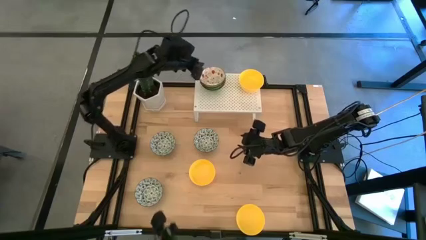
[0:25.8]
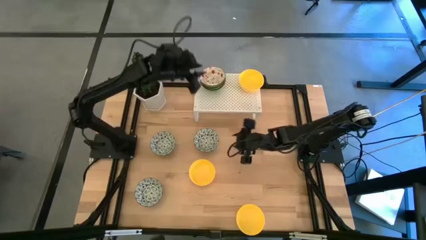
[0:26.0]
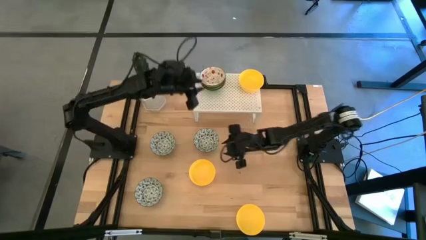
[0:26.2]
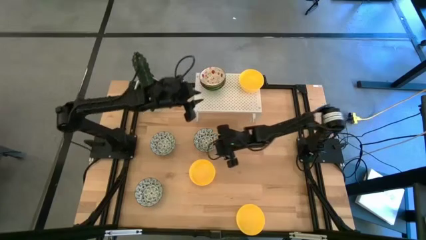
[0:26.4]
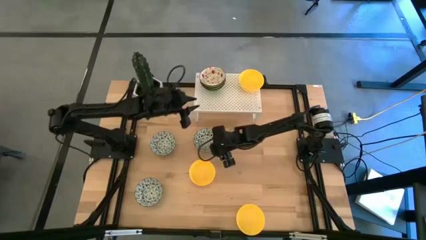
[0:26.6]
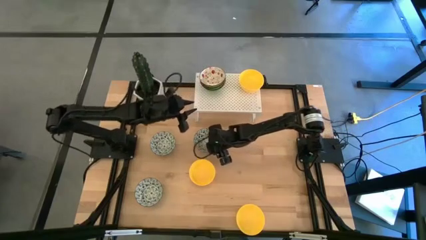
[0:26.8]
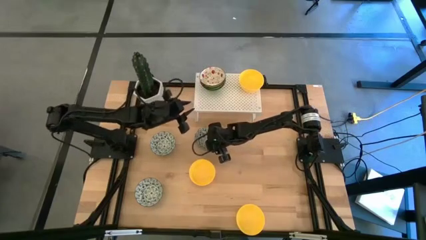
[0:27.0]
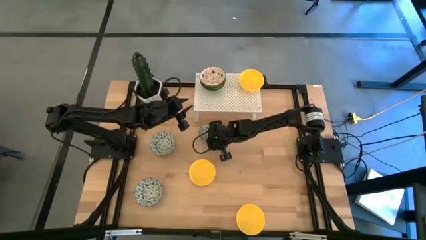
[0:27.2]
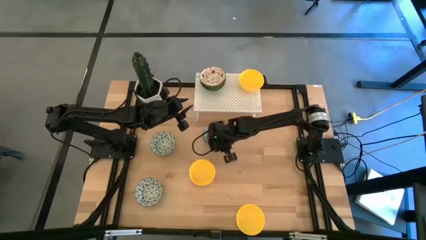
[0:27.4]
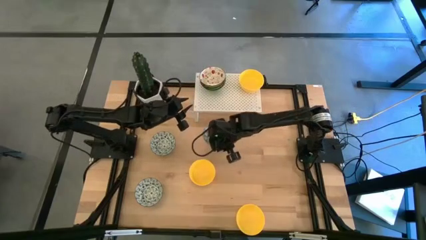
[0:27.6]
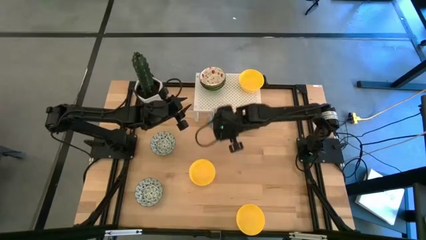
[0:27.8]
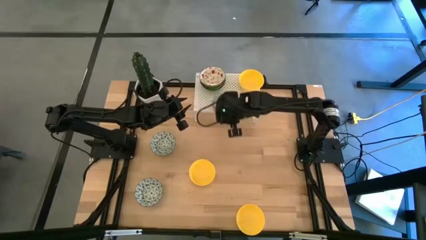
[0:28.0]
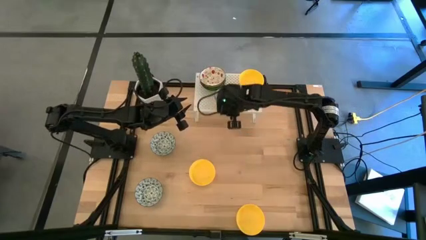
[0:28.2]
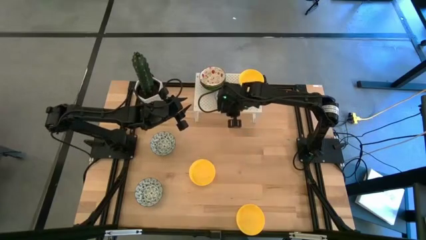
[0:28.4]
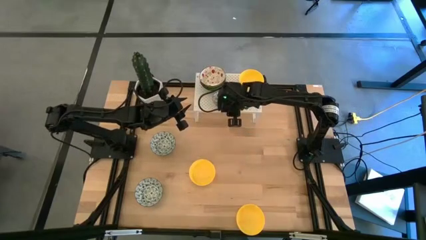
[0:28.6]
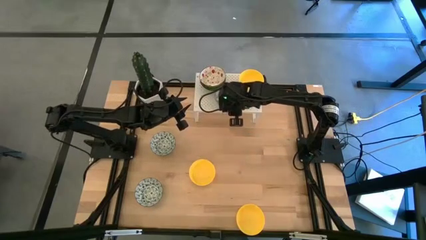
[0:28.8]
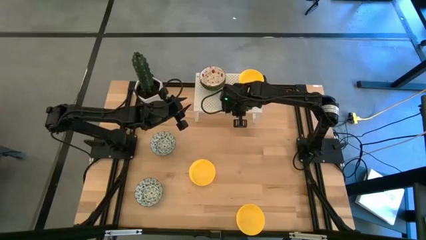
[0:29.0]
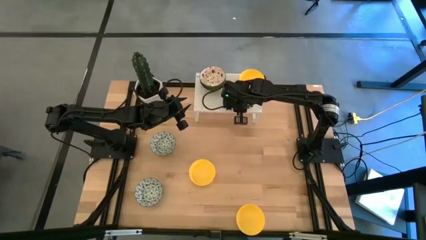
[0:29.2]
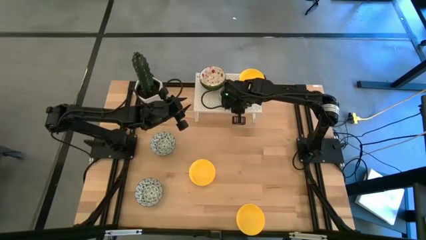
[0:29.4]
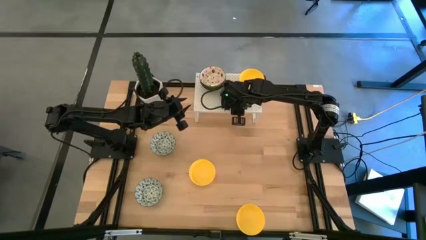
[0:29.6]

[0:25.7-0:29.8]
Task: Pick & Place Mini bowls
Put the right white blue bowl on the shelf

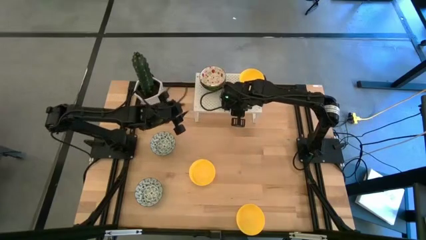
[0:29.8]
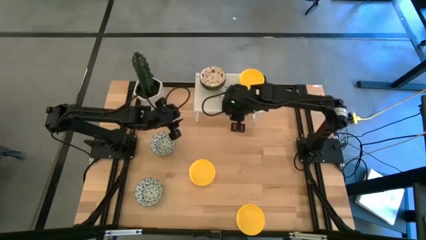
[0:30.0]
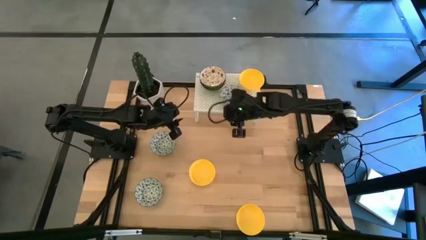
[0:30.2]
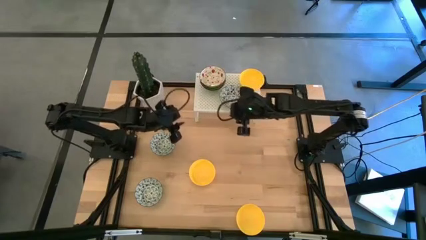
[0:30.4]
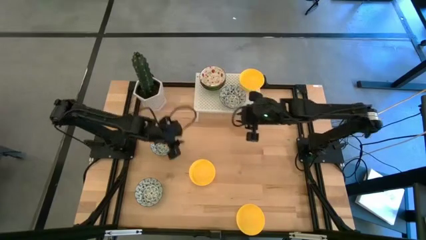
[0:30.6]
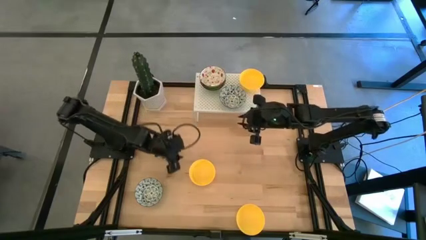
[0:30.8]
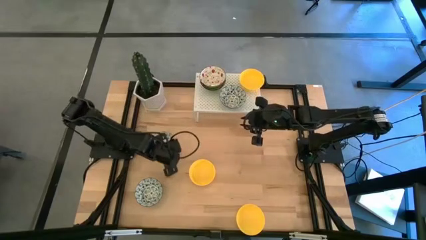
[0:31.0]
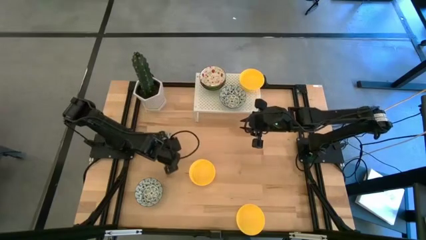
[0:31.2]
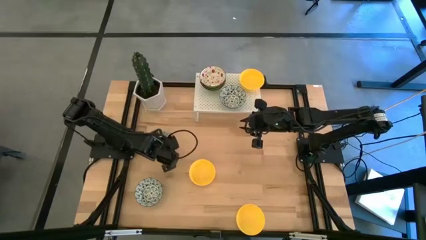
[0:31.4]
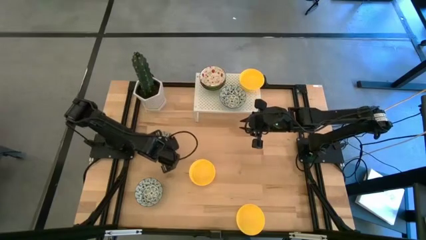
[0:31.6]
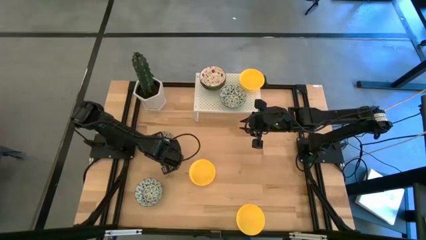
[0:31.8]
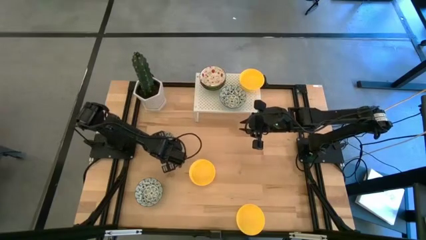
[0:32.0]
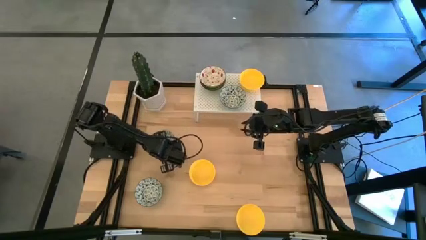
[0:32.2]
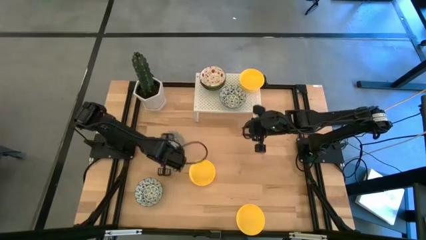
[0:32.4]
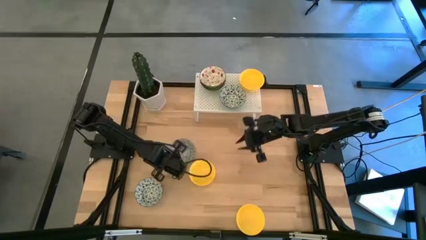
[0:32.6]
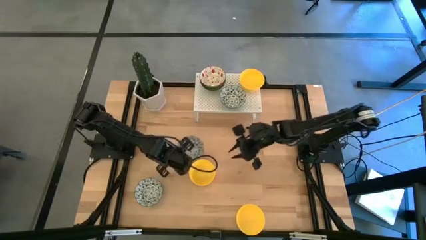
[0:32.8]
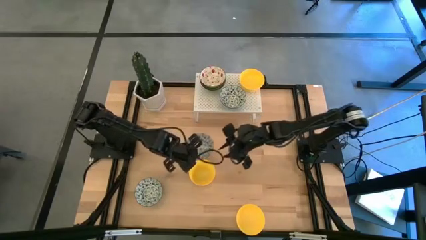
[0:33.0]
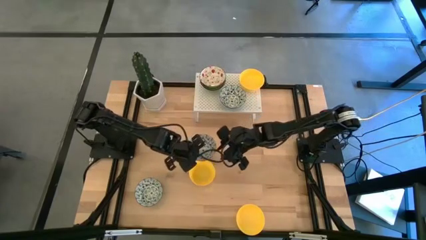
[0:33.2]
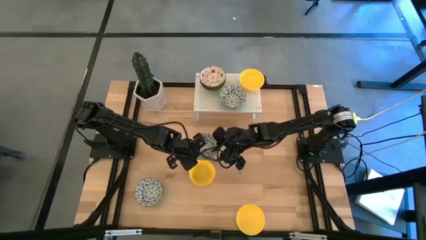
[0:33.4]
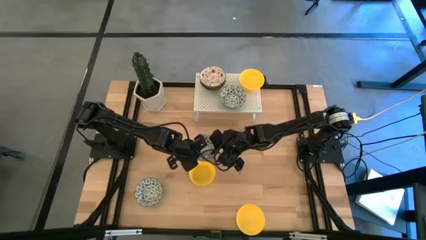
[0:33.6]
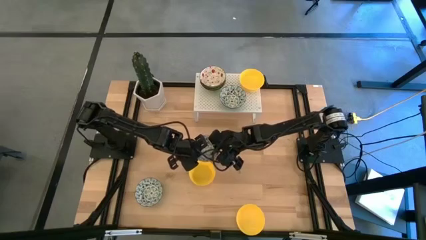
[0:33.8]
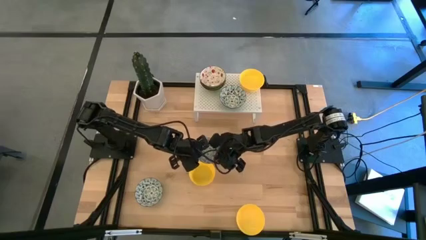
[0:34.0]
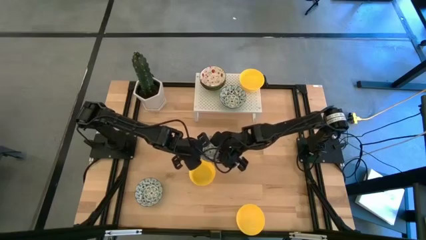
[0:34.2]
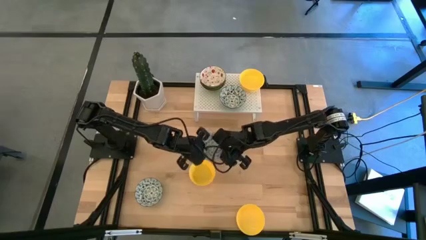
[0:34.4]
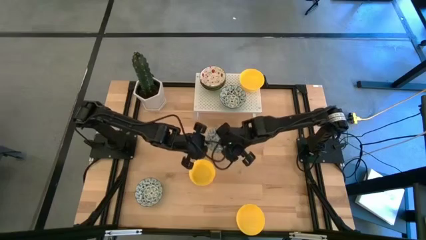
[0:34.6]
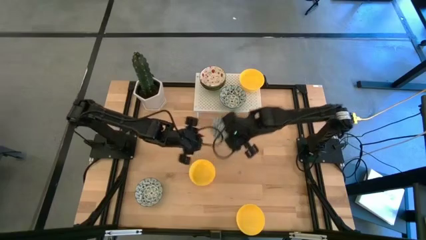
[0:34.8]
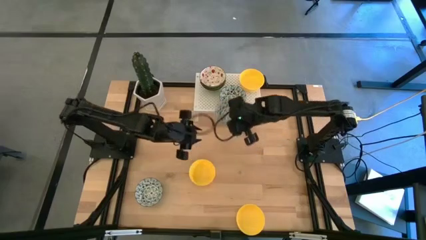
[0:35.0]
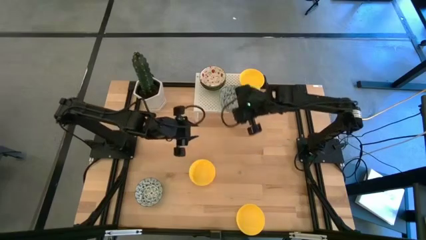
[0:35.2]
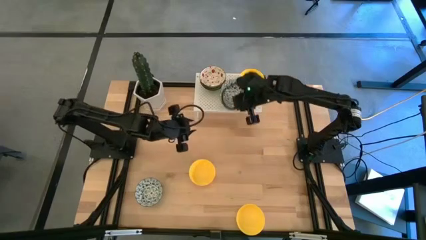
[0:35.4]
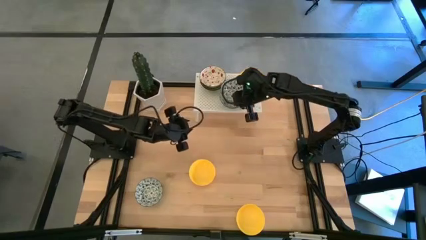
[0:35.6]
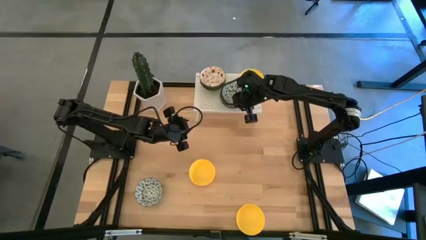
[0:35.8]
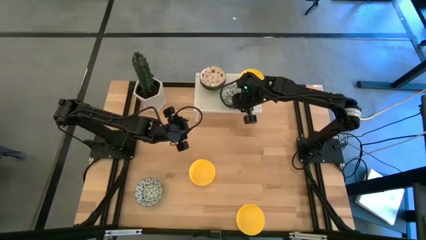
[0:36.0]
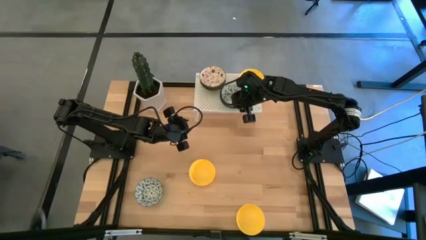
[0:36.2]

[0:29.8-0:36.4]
Stack the top white blue bowl on top of the white blue bowl on the shelf

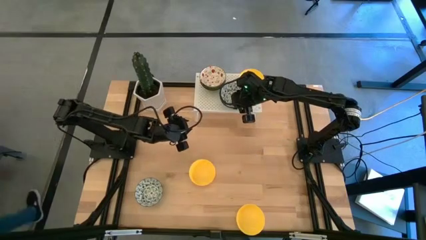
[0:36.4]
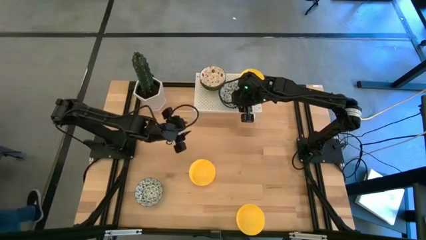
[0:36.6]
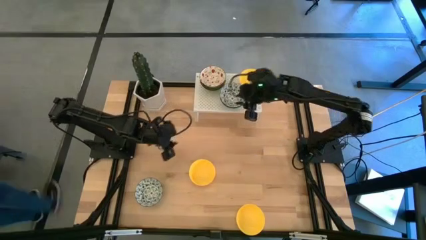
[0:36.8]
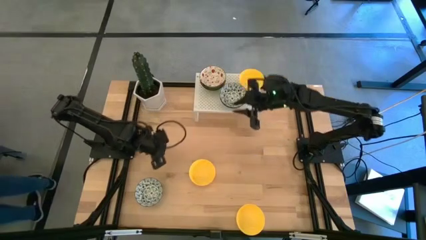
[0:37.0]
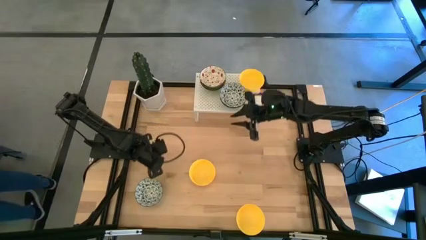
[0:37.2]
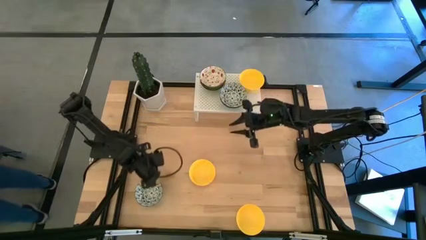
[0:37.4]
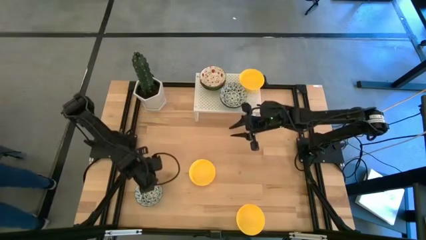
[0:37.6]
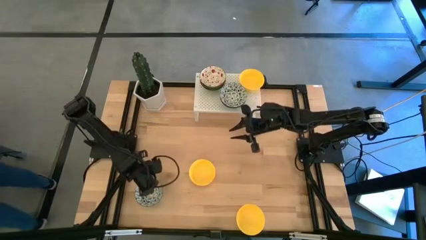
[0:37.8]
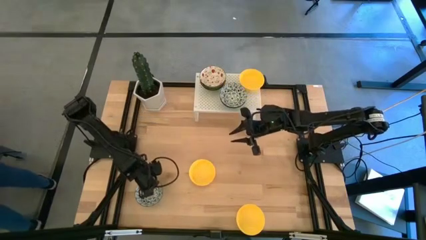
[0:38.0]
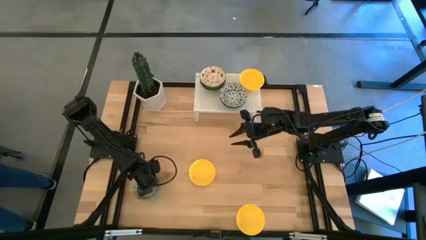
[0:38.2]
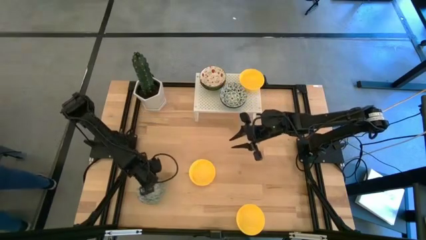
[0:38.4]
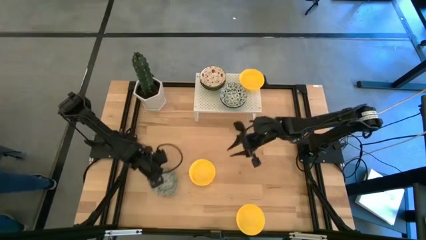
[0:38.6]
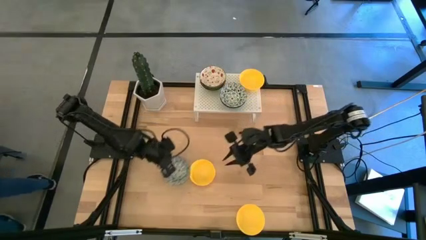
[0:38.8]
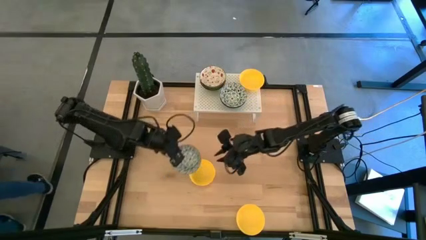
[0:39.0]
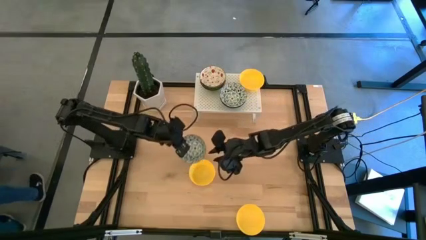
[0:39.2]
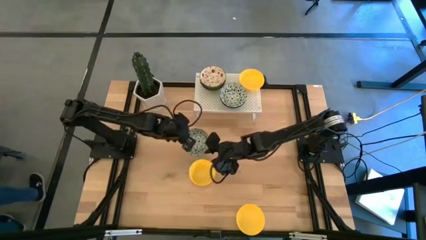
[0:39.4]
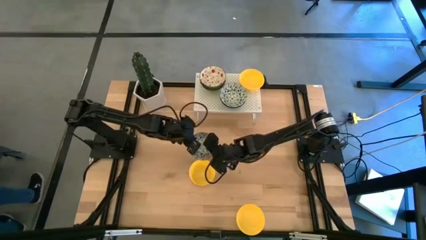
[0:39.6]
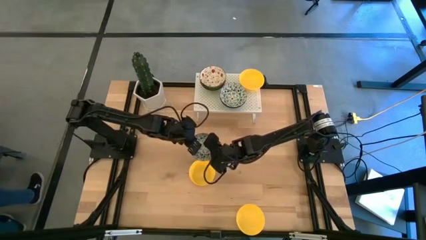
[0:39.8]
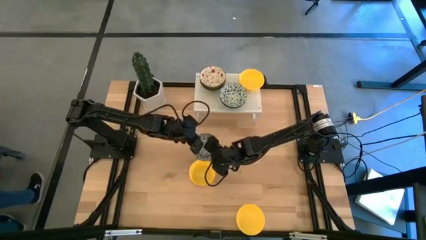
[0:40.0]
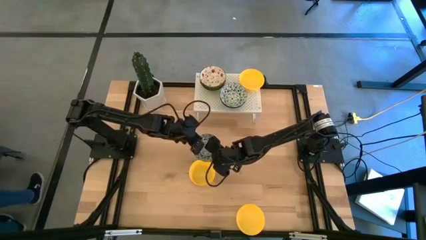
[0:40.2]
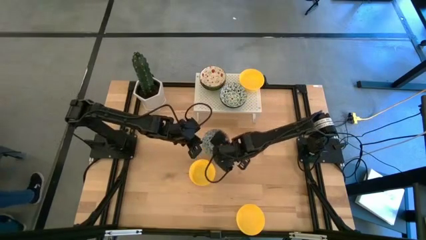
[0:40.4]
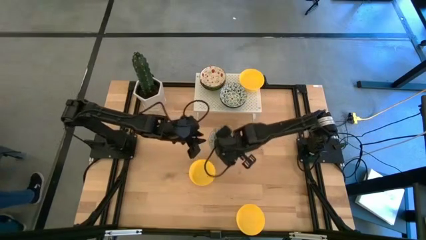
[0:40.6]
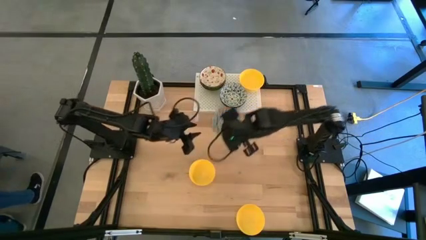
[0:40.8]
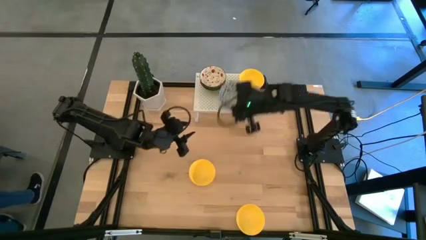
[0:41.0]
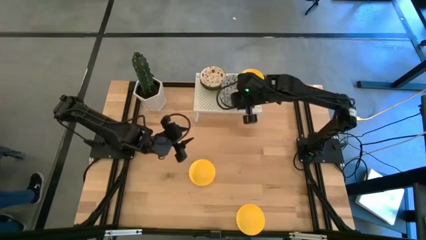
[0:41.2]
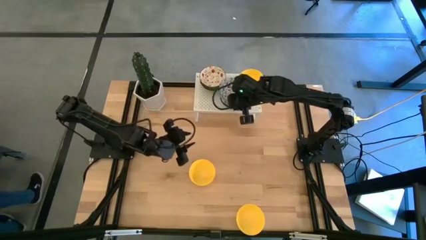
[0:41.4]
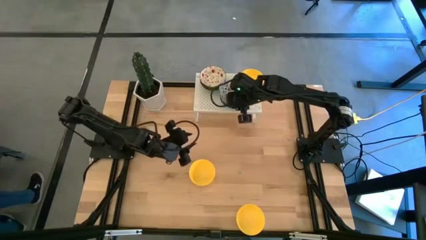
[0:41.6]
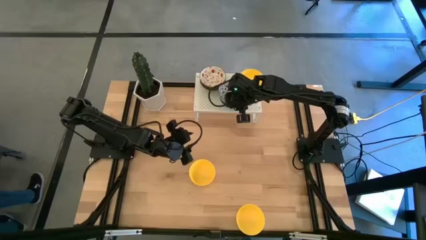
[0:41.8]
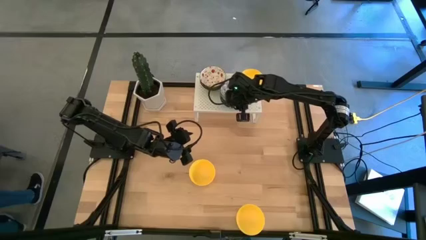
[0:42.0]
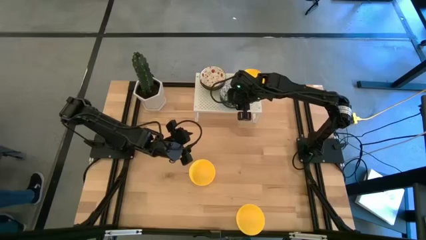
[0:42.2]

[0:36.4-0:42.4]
Stack the white blue bowl on top of the white blue bowl on the shelf
